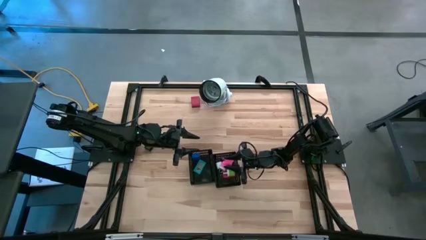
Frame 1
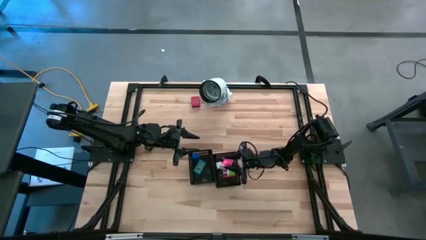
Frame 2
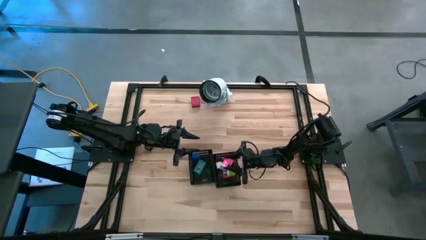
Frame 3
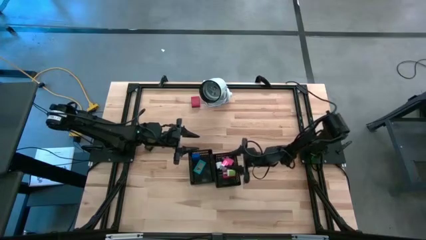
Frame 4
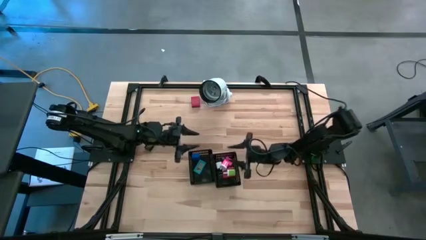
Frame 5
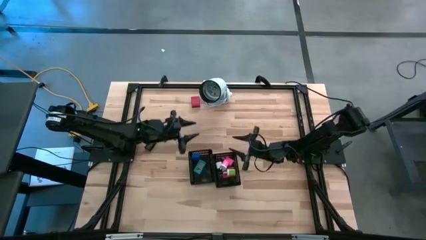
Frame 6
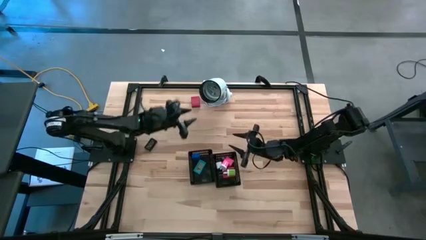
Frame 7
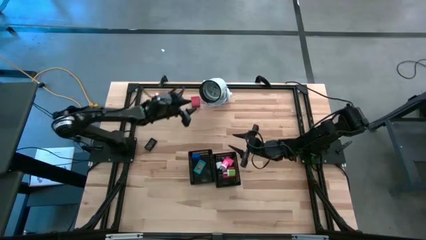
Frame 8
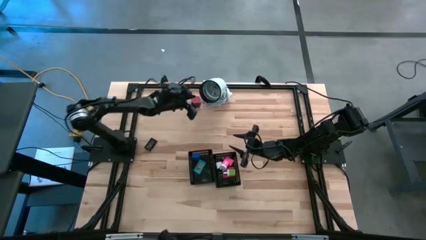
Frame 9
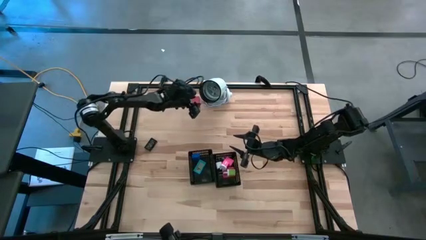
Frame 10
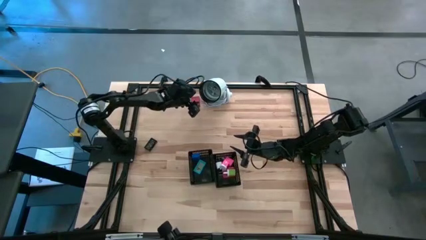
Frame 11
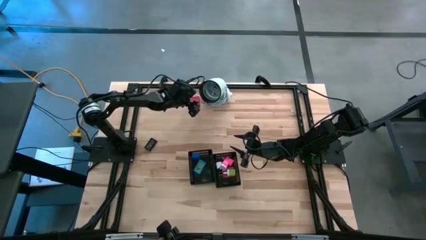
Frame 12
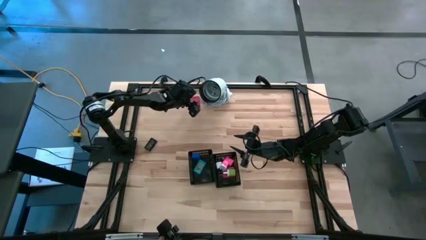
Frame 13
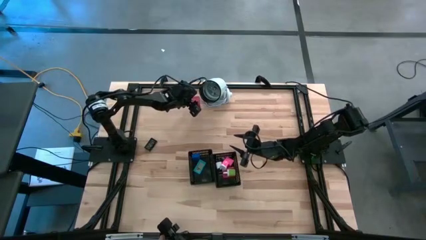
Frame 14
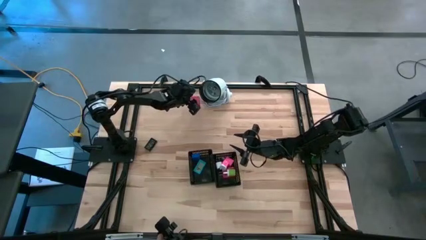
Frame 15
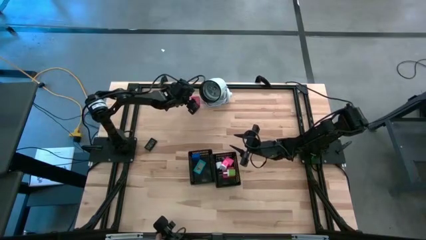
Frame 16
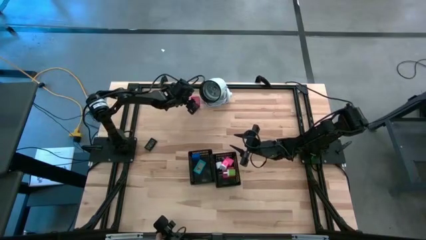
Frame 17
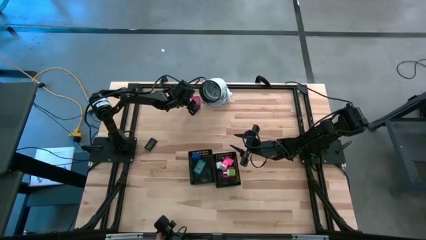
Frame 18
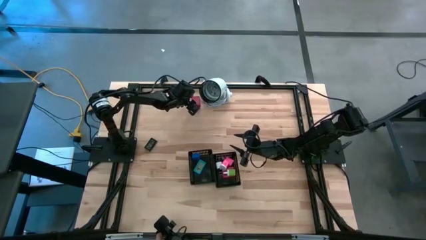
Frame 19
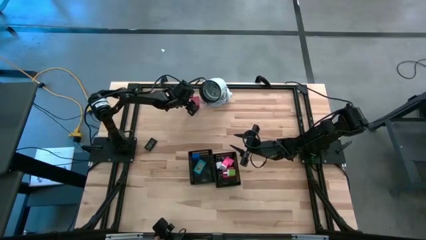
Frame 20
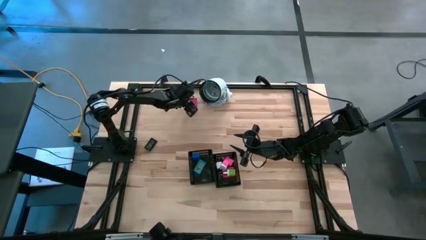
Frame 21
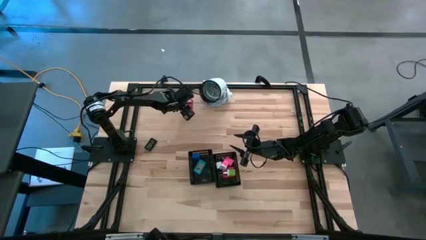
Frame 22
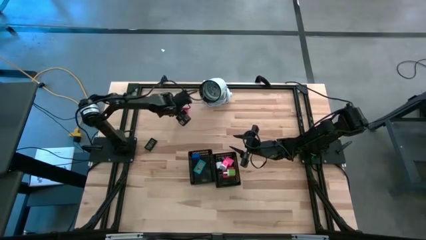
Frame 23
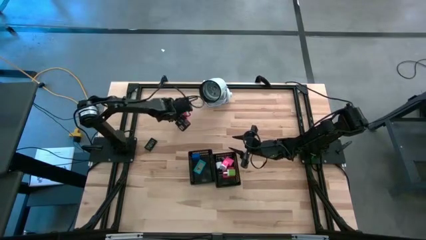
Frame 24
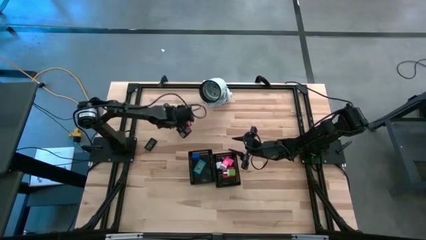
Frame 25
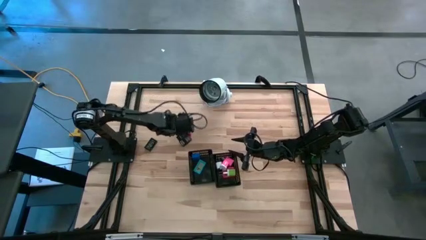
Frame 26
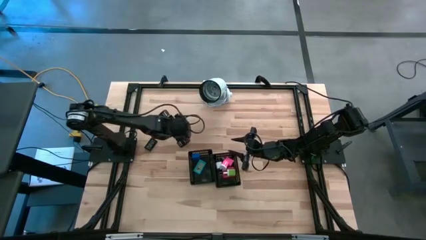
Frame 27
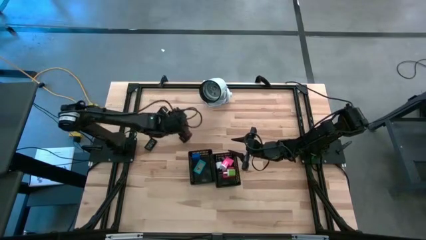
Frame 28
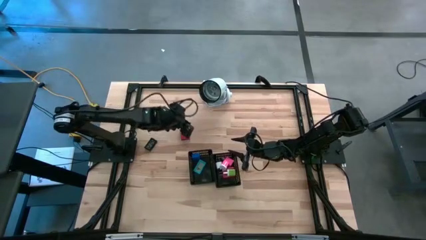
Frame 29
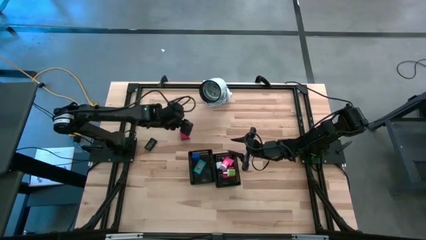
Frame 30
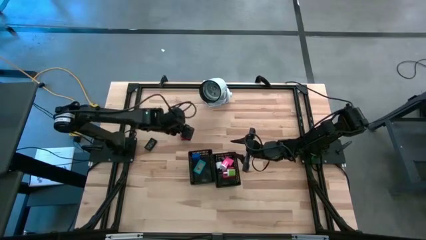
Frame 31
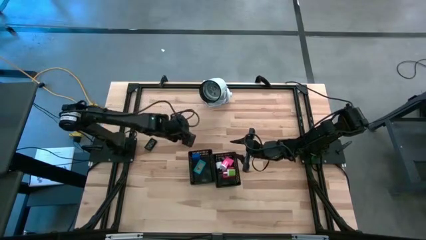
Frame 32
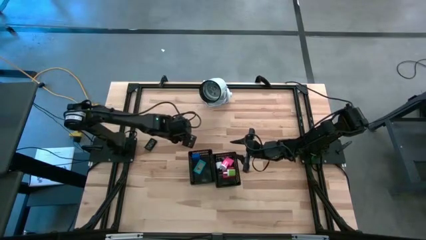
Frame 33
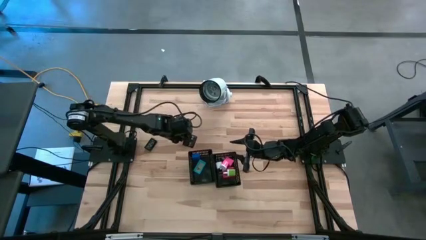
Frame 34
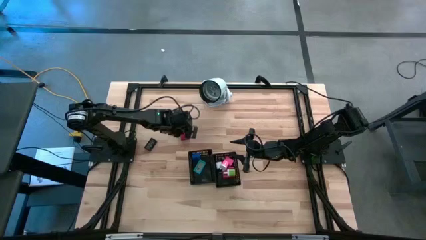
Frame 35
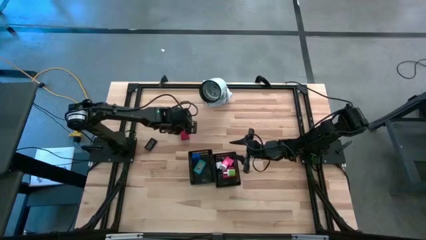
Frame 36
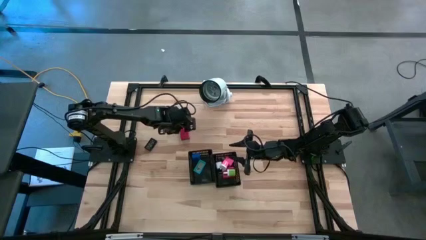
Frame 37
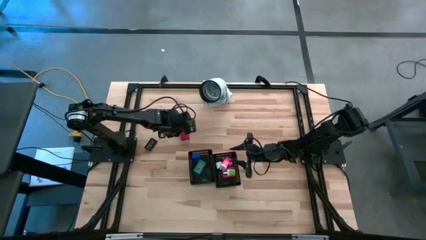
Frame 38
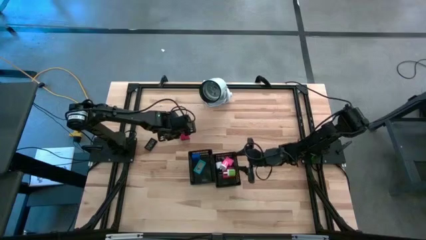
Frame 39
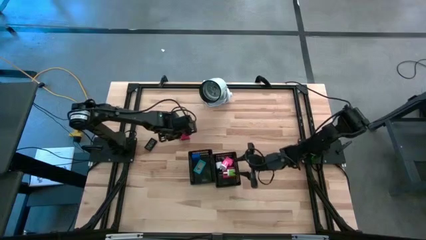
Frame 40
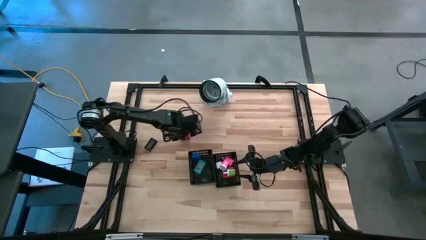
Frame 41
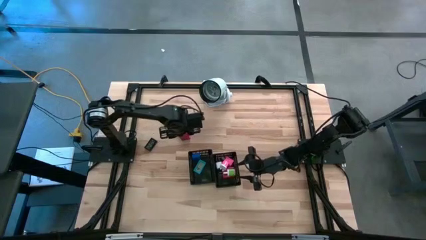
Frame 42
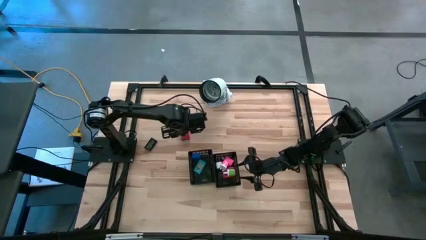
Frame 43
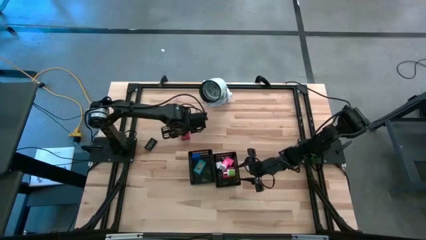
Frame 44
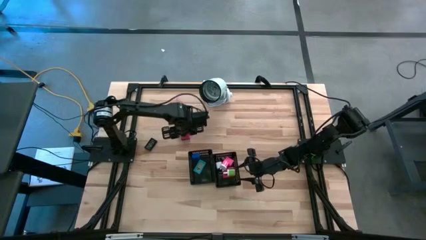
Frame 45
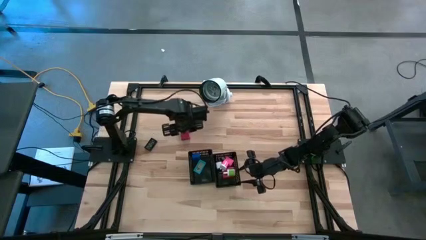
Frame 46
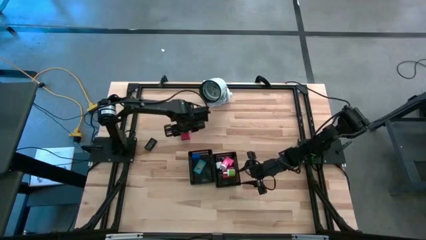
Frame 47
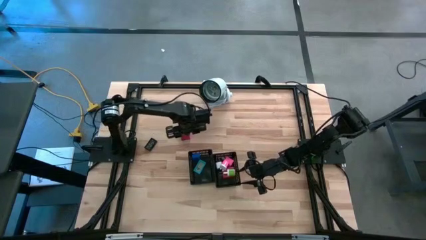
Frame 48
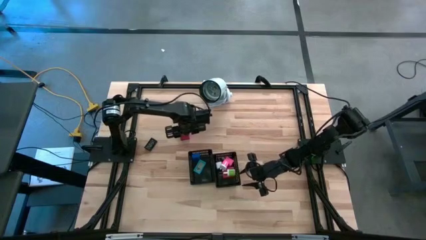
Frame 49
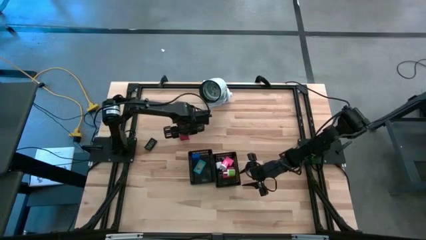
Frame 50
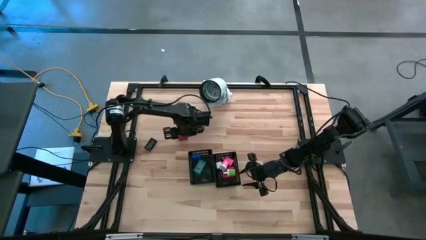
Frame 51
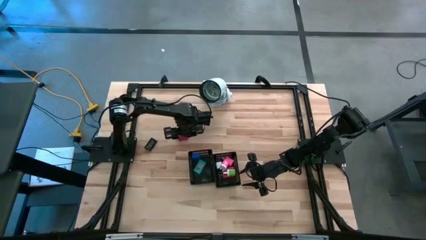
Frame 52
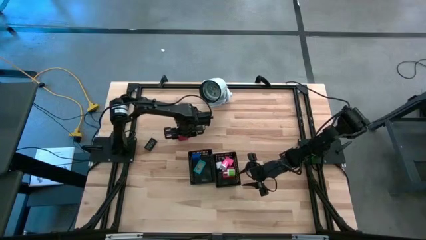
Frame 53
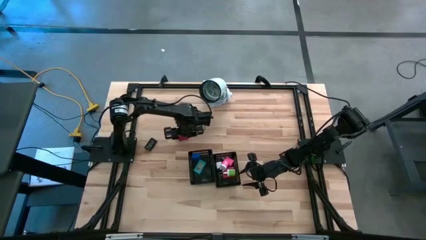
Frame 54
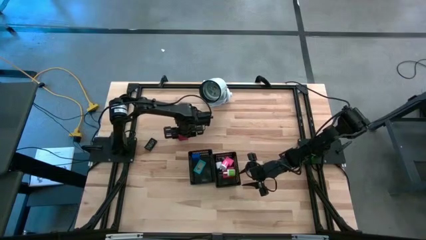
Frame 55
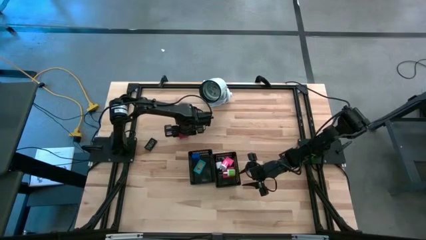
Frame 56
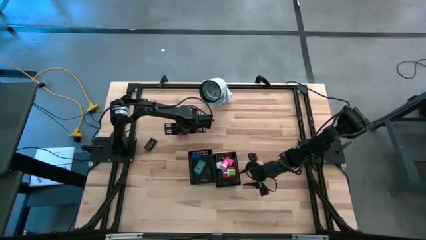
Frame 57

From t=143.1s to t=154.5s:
Task: Pick & Place Office items
Put the red charger adapter into the right black bin

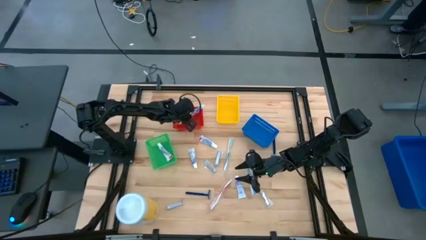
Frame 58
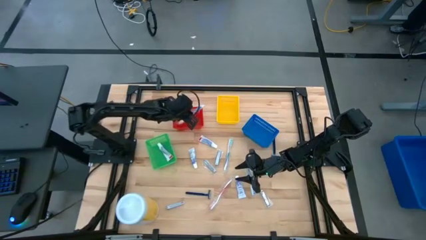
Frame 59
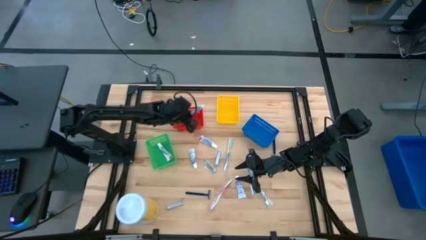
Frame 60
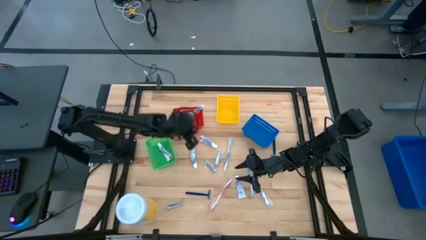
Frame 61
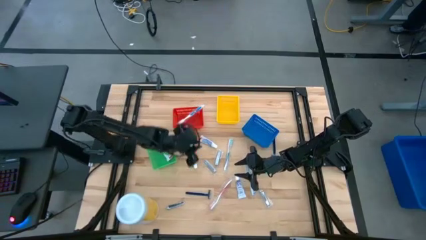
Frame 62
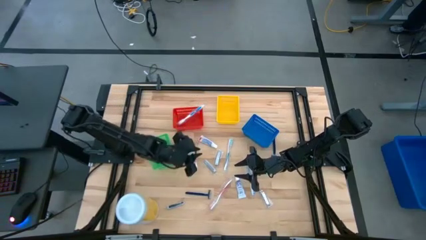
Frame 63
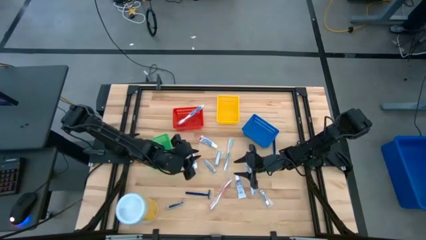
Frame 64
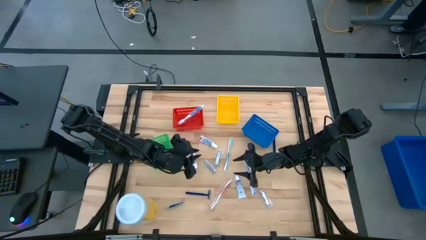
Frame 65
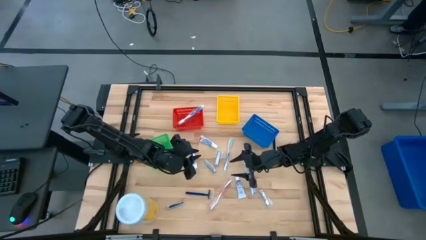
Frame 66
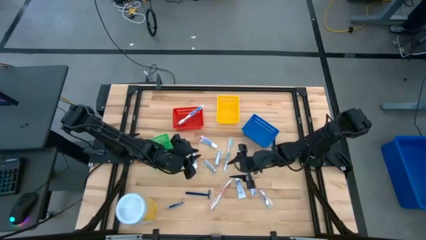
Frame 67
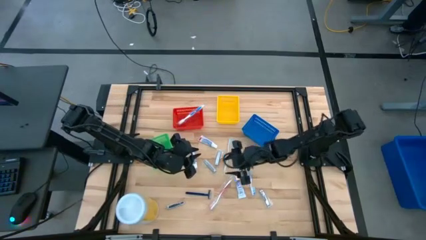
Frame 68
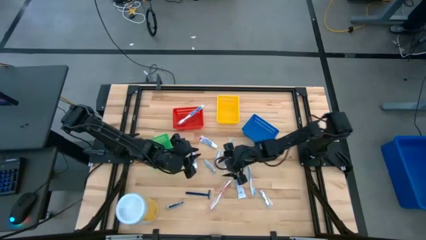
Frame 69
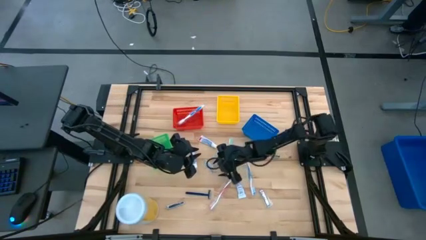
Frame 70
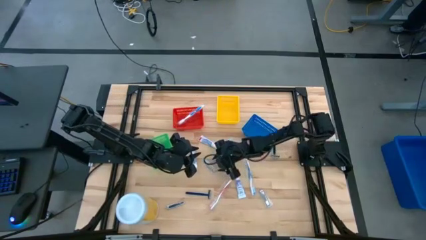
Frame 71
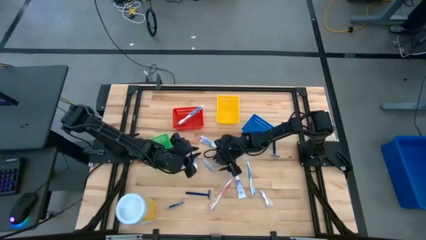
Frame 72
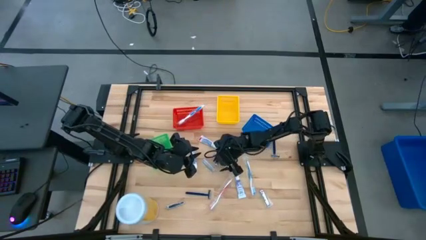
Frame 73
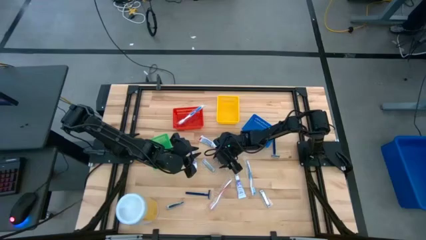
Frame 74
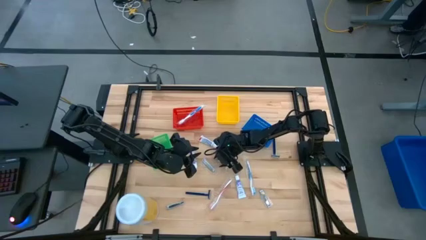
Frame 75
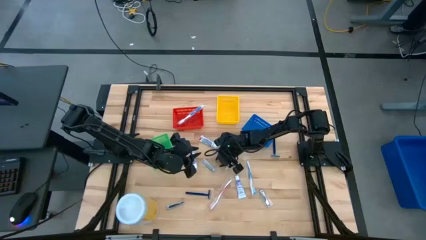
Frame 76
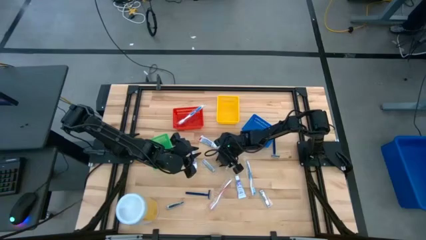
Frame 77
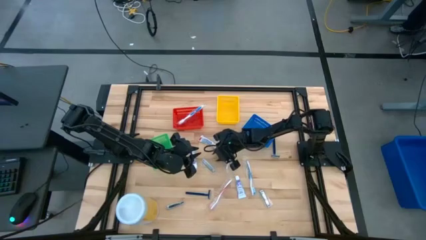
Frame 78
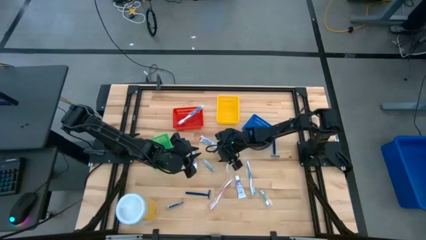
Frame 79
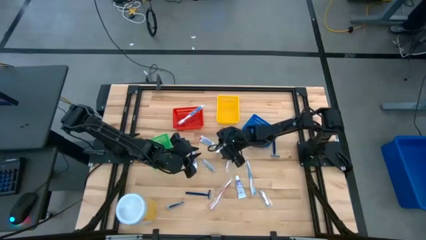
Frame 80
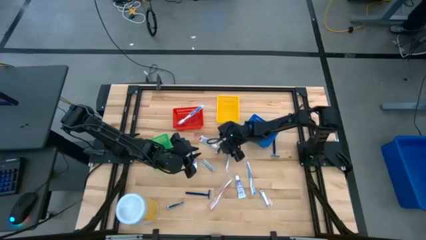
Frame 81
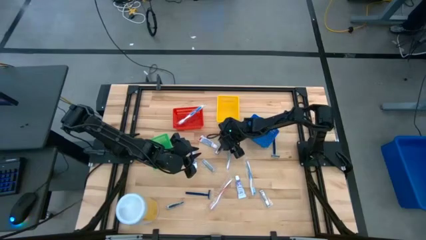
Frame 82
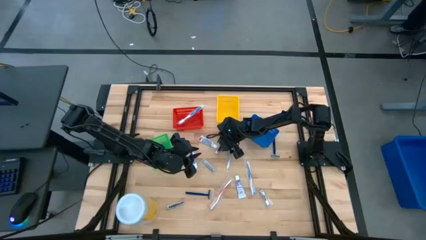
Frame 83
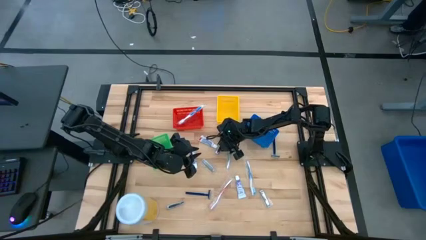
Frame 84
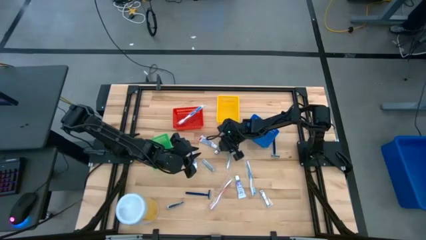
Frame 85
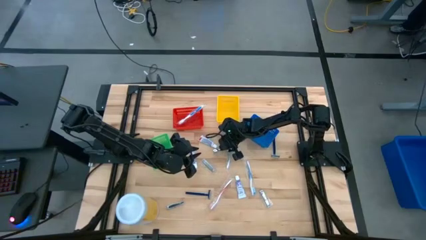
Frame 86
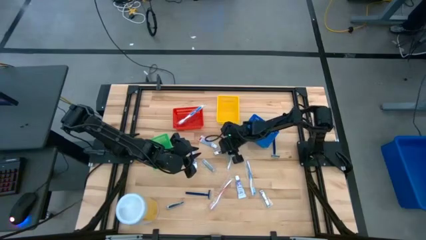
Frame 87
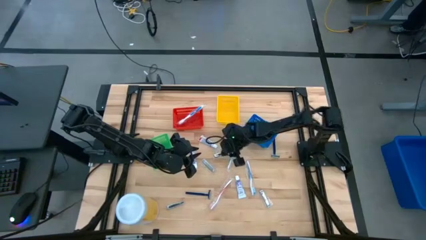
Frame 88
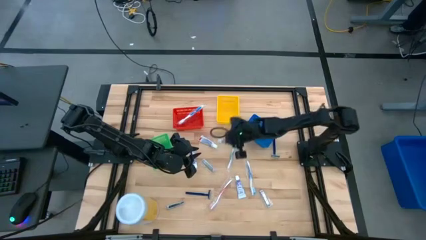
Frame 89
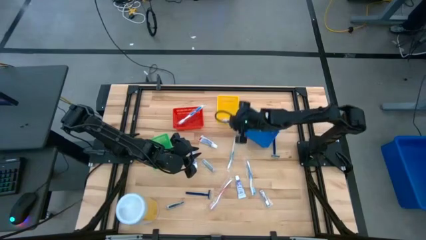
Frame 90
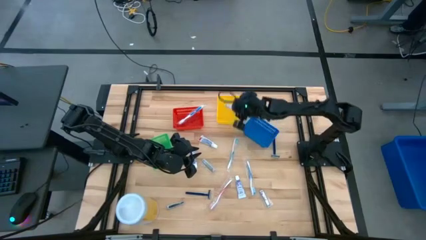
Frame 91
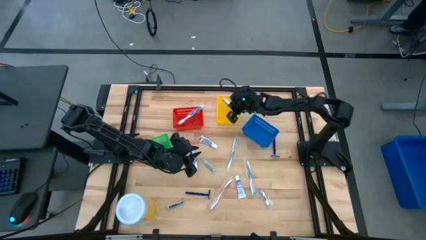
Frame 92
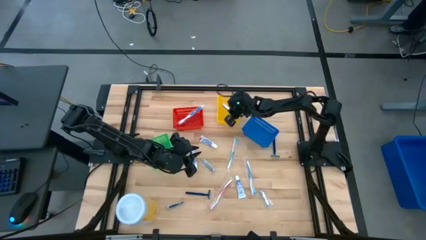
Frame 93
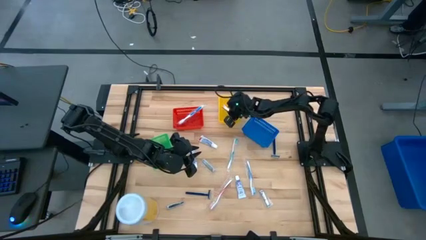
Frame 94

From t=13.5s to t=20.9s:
Task: Pick & Place Travel size toiletries
Put the silver nail cutter into the yellow bin
